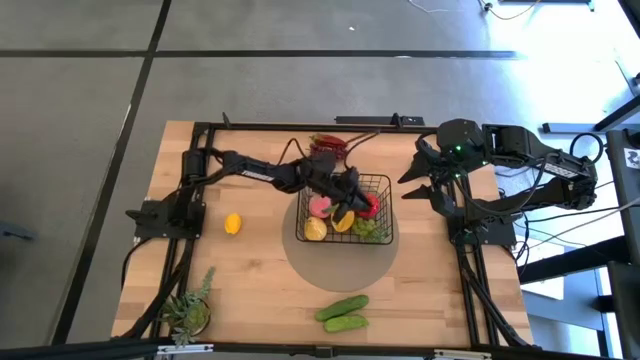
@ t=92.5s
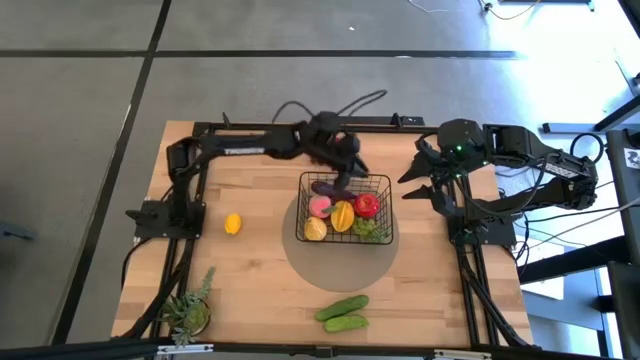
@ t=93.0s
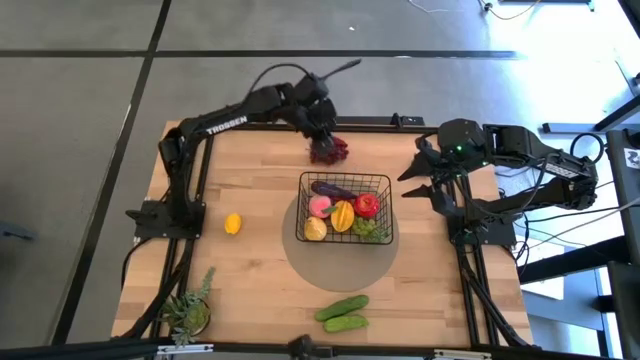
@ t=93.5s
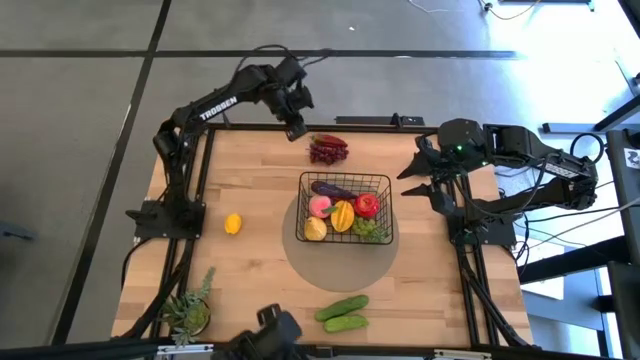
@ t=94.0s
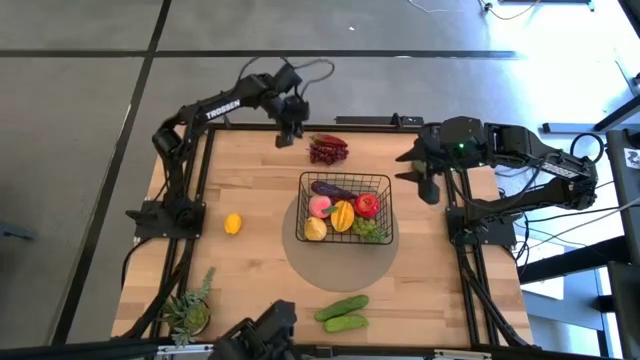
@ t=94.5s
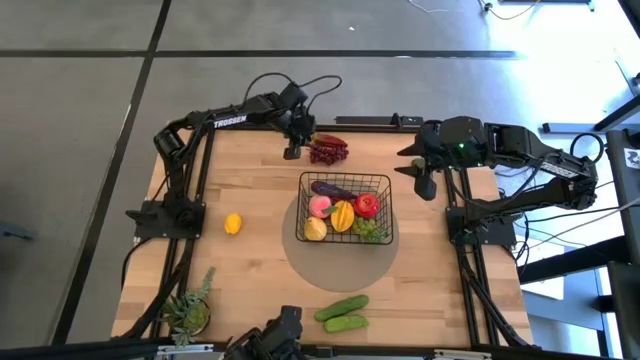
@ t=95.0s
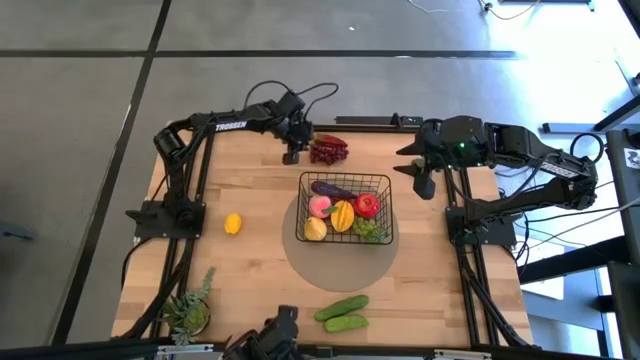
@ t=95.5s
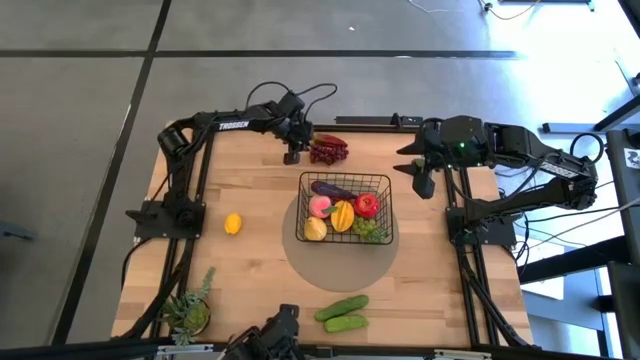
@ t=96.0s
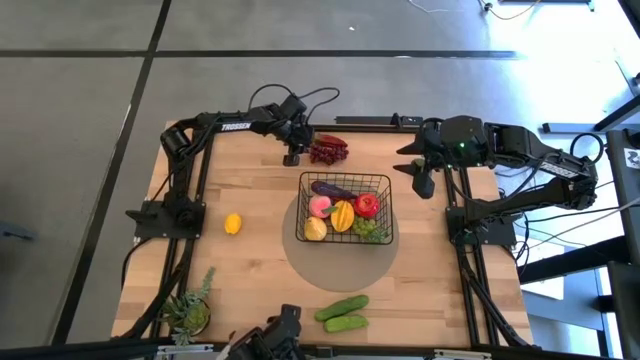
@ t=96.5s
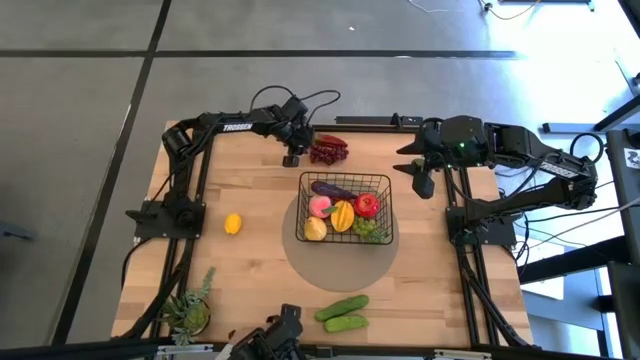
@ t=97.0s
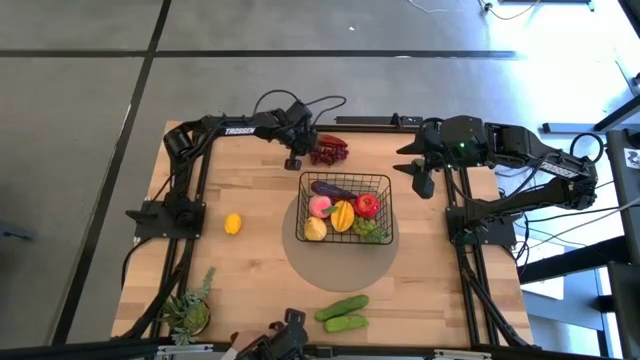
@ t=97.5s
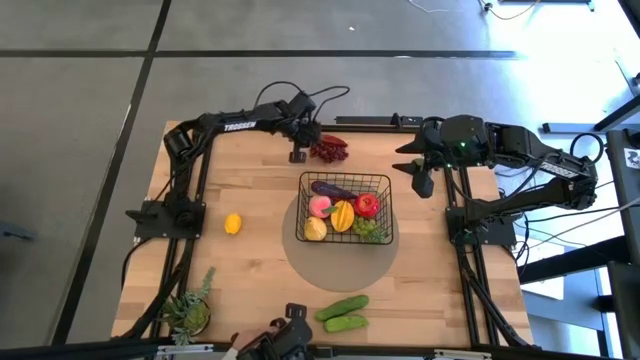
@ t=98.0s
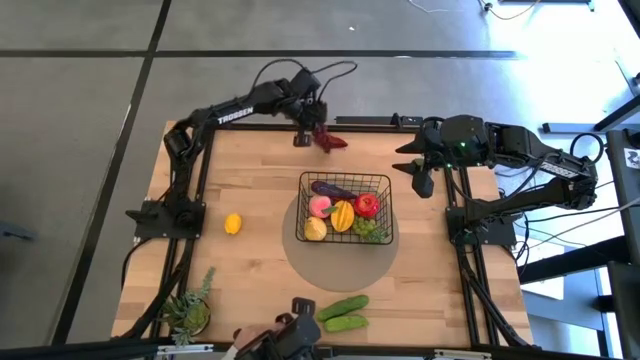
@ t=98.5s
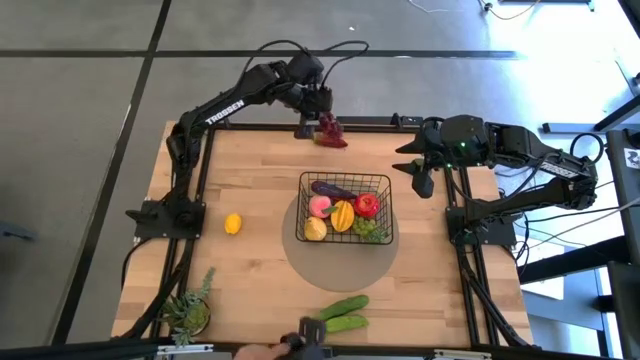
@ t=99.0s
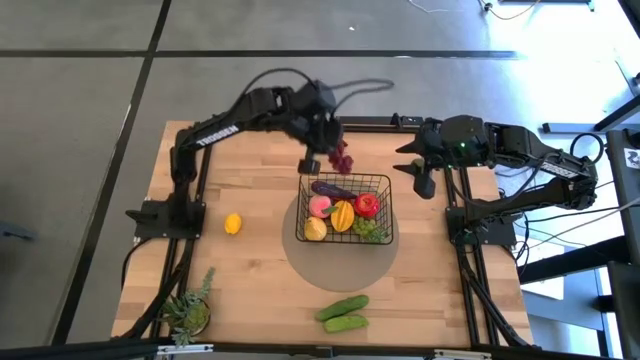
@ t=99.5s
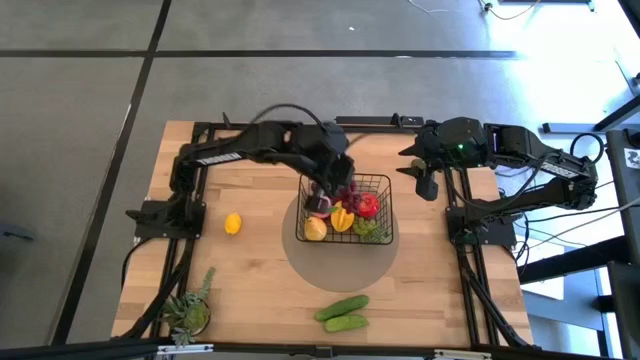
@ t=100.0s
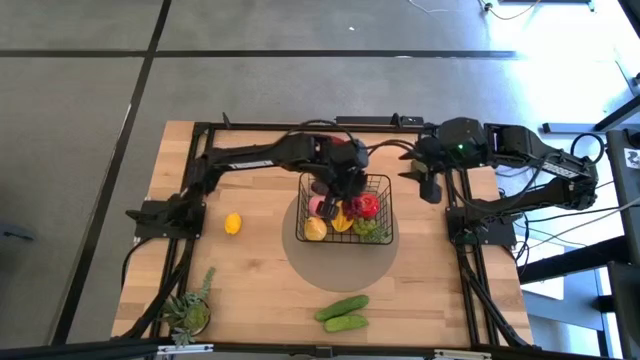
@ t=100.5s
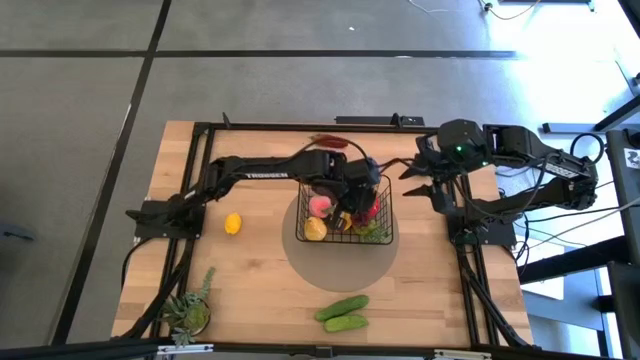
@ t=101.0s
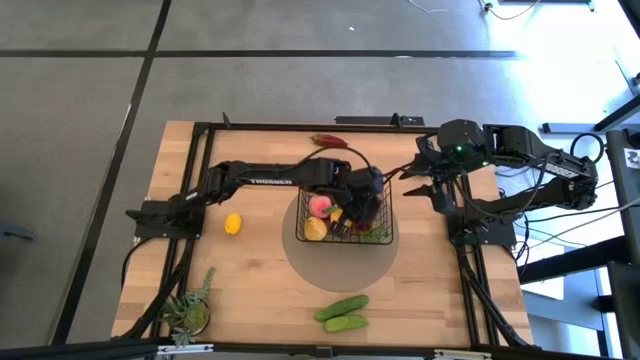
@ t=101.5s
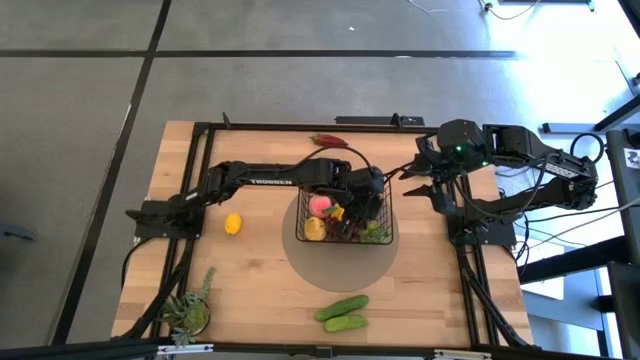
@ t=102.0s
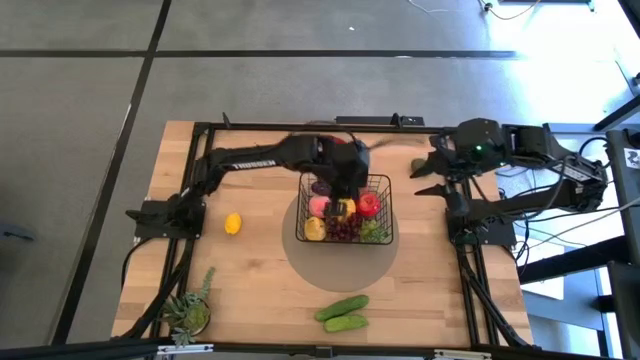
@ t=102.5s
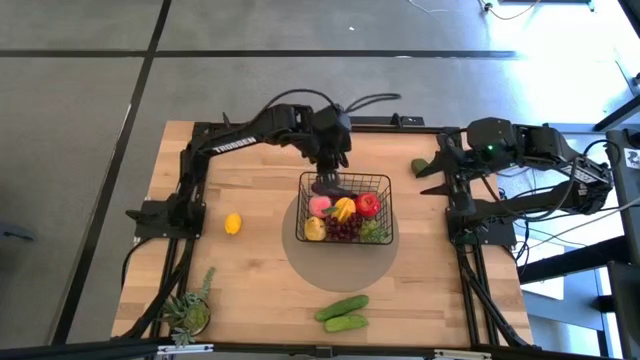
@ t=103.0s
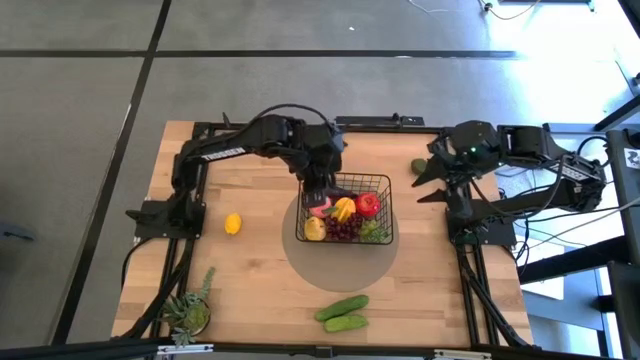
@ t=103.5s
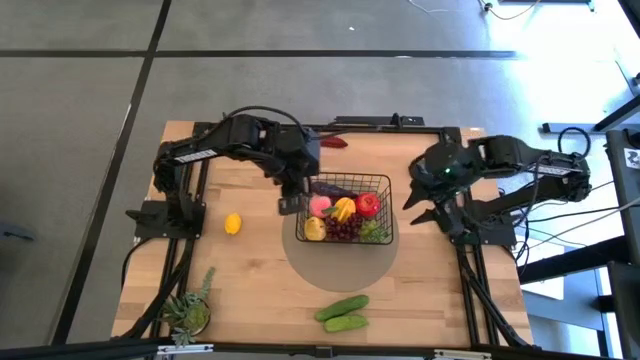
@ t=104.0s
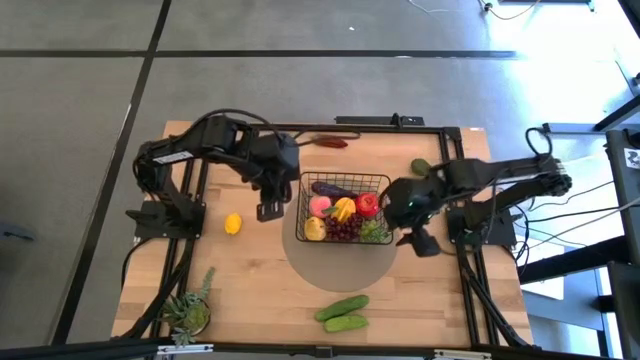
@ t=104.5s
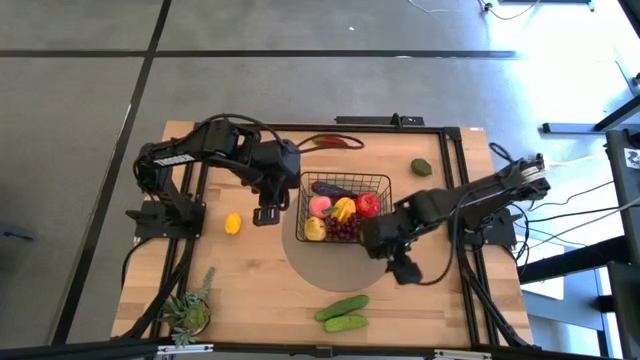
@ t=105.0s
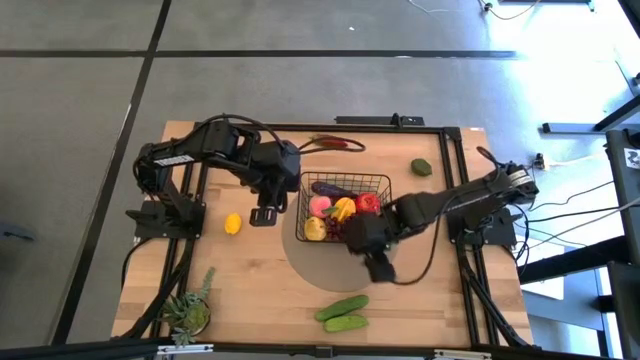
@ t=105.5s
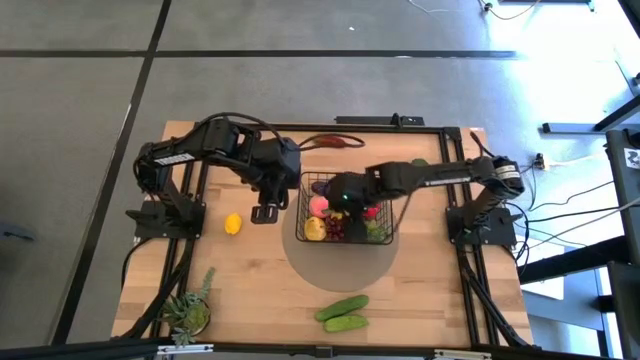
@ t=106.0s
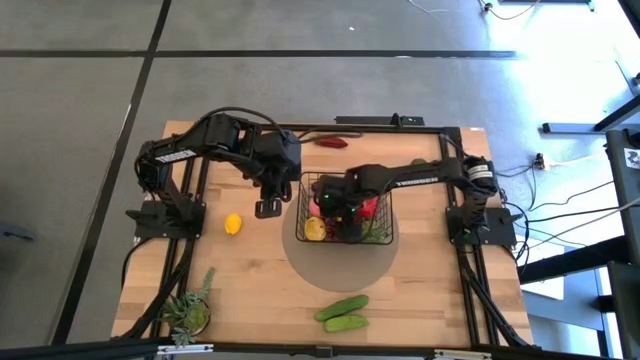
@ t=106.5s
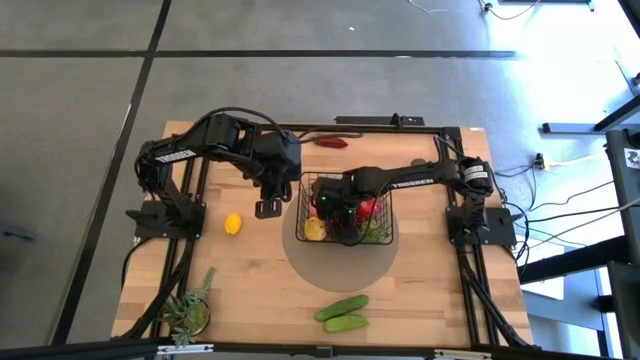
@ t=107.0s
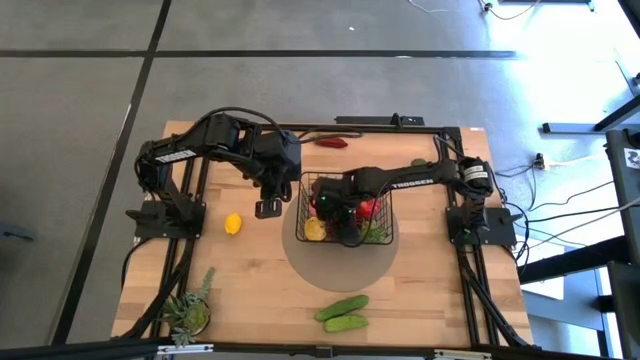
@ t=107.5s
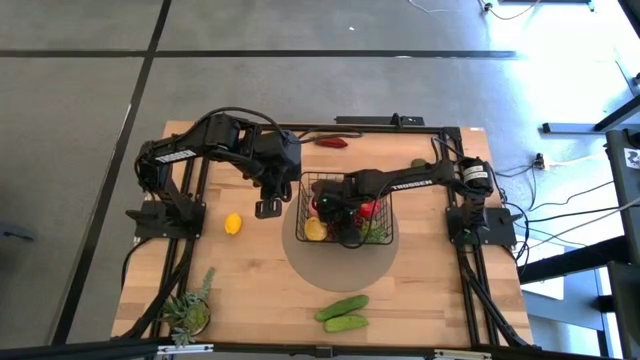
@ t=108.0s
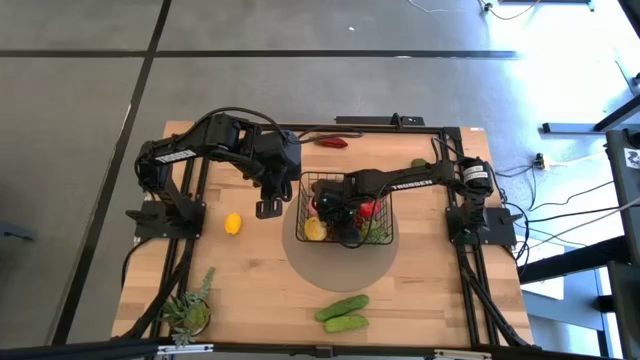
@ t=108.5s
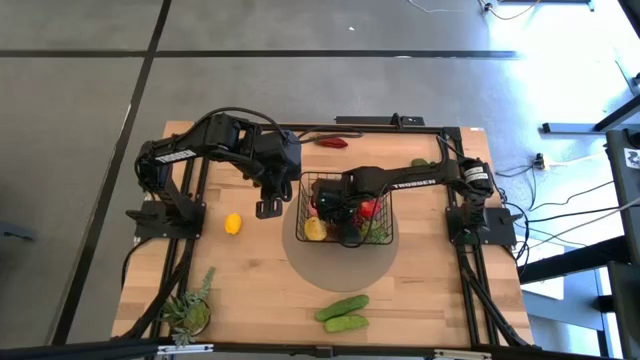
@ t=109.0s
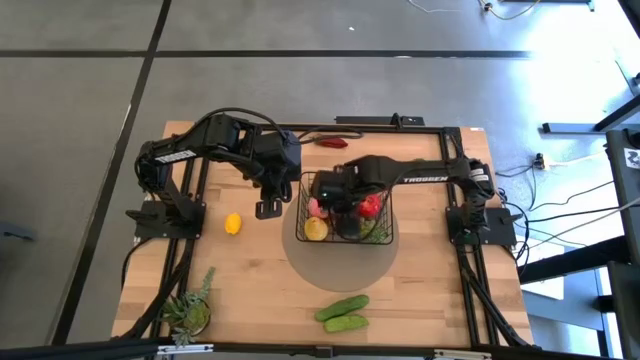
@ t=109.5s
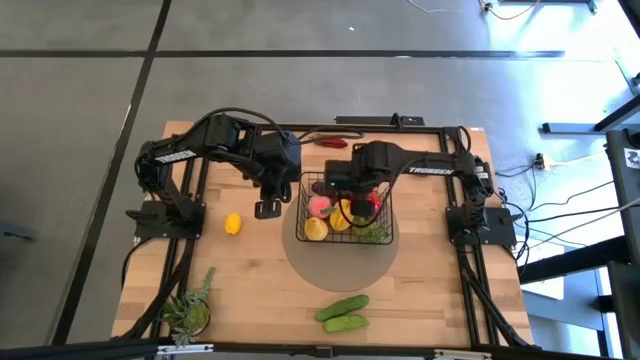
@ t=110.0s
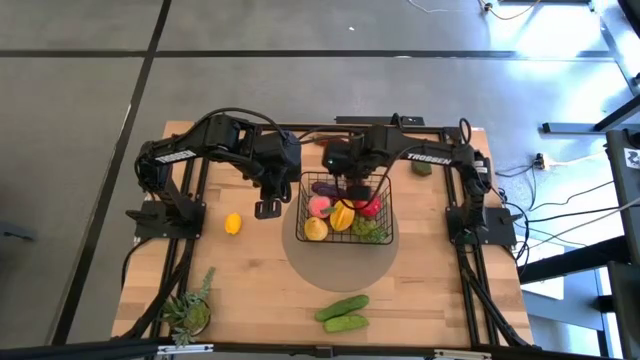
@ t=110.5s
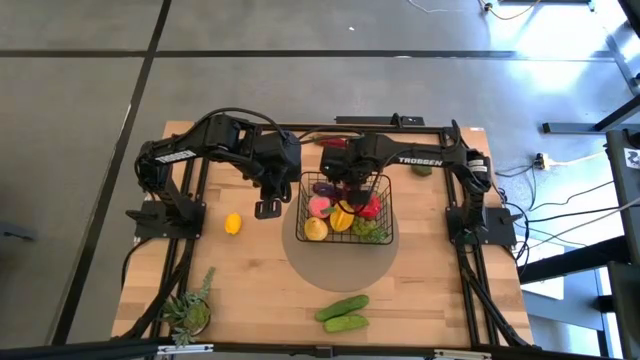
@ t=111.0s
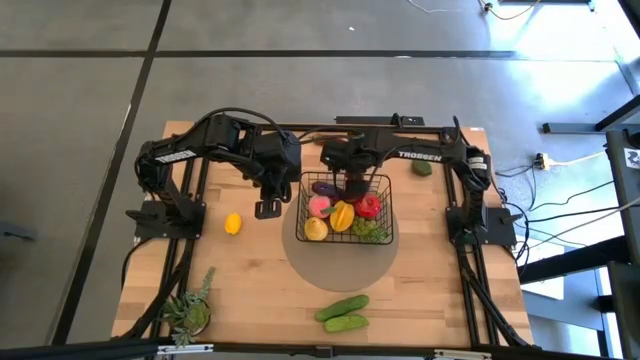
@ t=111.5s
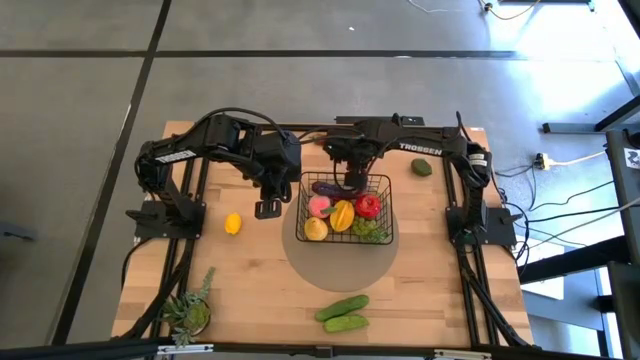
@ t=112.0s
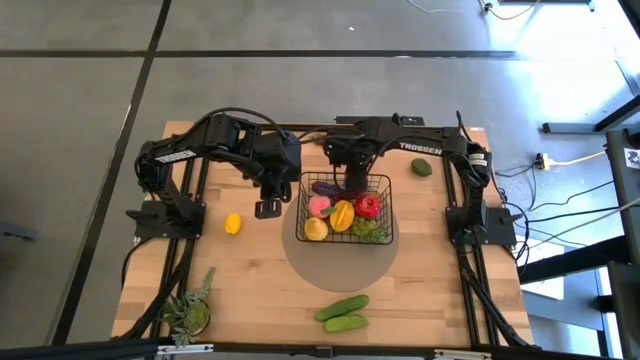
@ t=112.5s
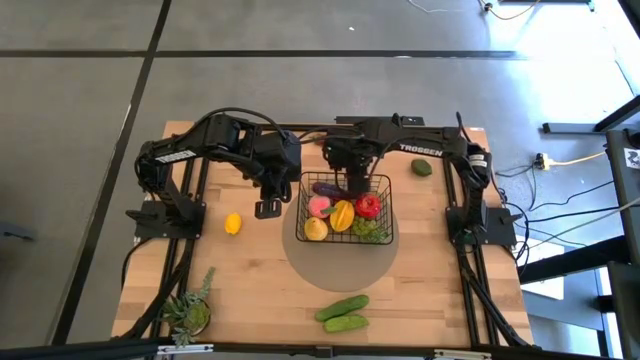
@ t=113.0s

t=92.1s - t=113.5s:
Task: Build produce basket
Put the red grapes into the black wire basket
